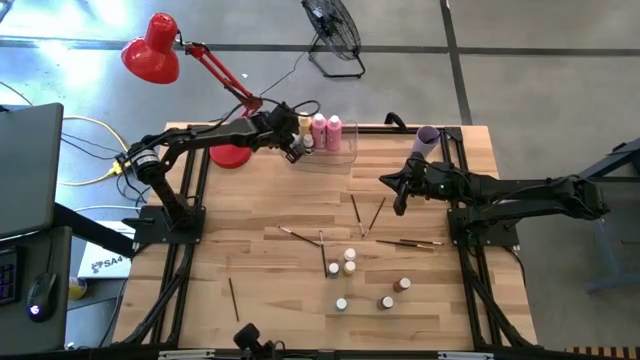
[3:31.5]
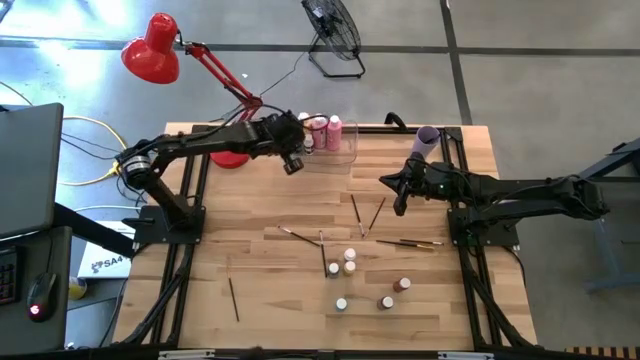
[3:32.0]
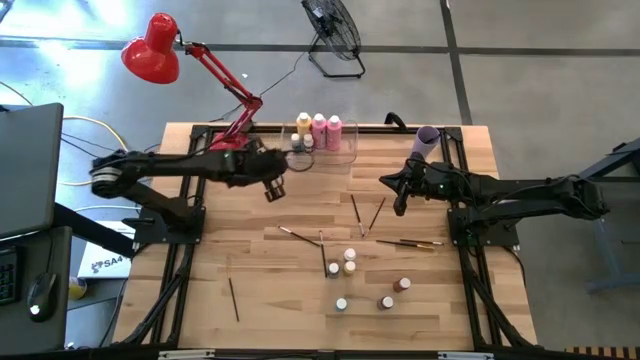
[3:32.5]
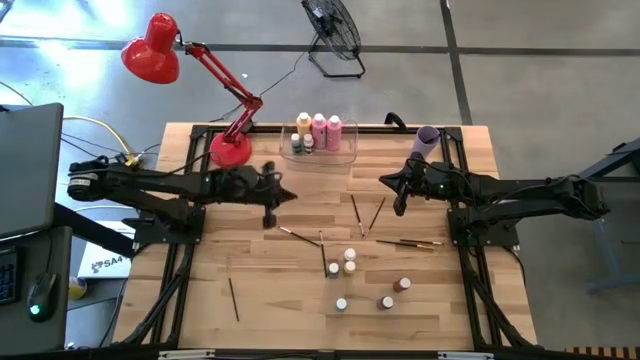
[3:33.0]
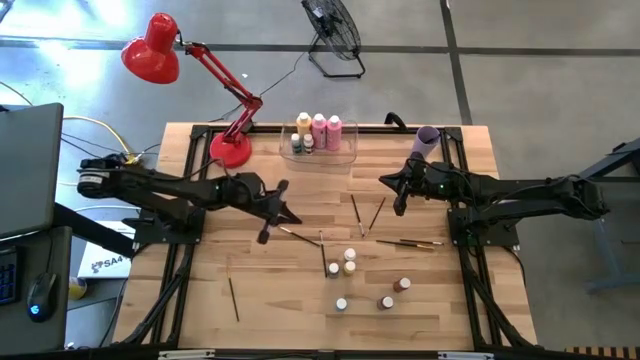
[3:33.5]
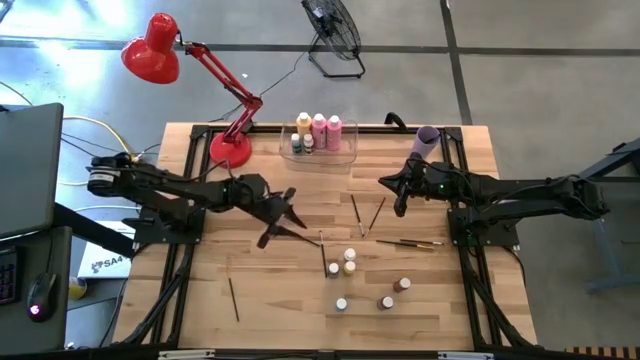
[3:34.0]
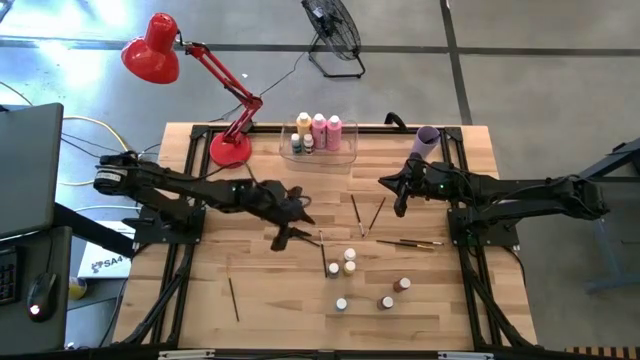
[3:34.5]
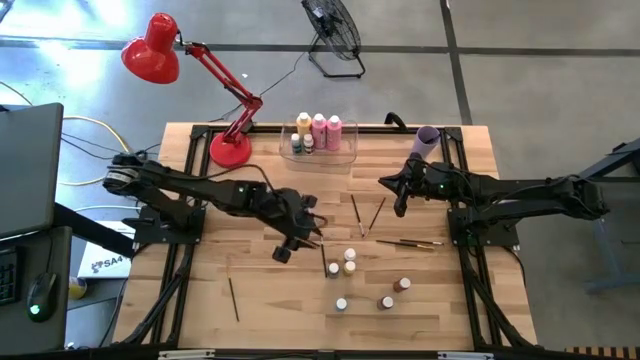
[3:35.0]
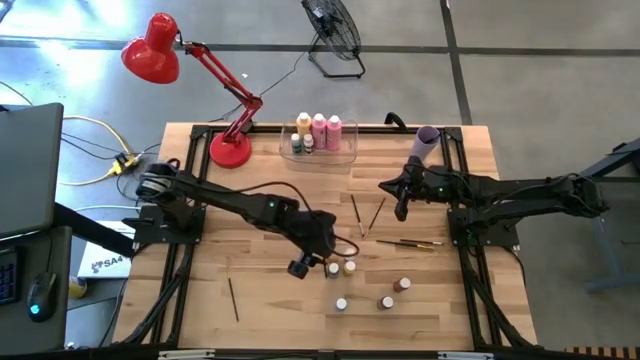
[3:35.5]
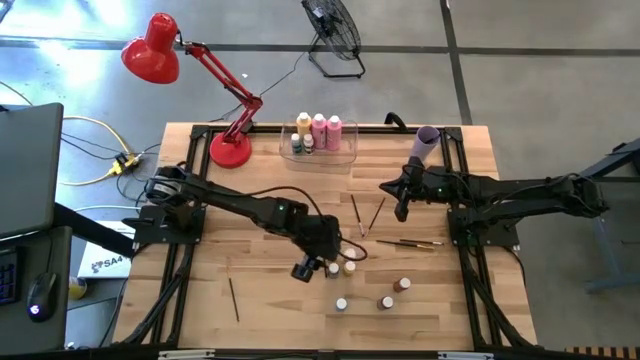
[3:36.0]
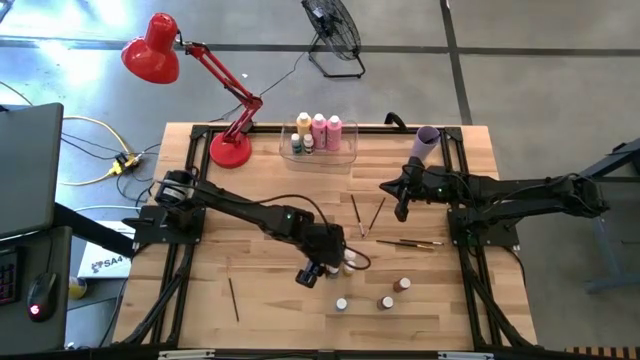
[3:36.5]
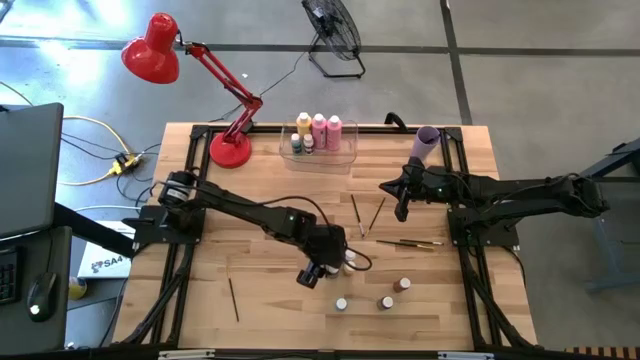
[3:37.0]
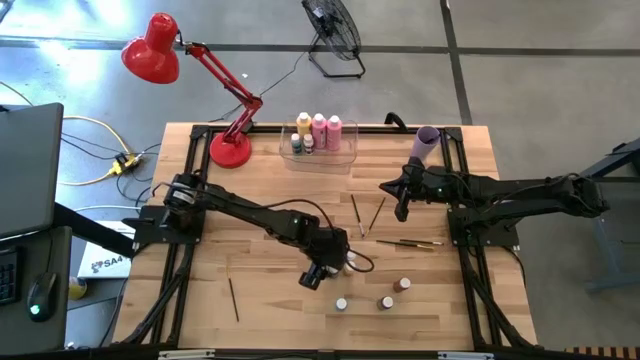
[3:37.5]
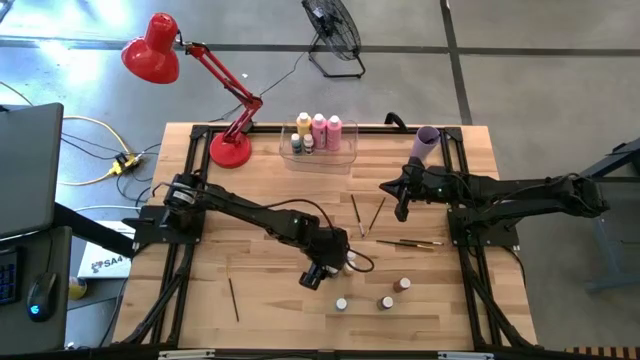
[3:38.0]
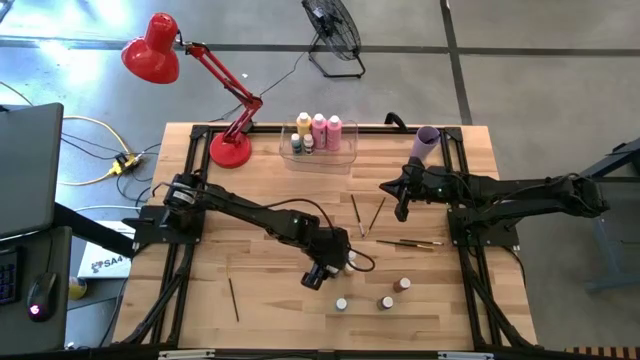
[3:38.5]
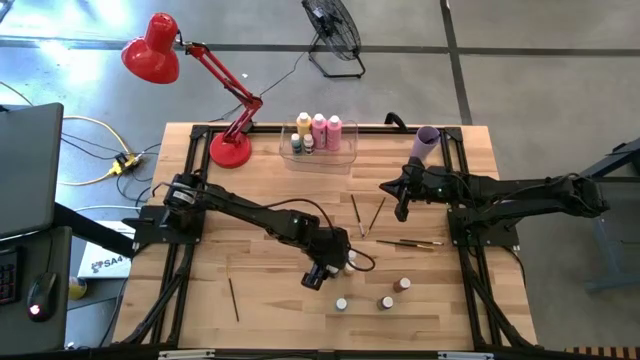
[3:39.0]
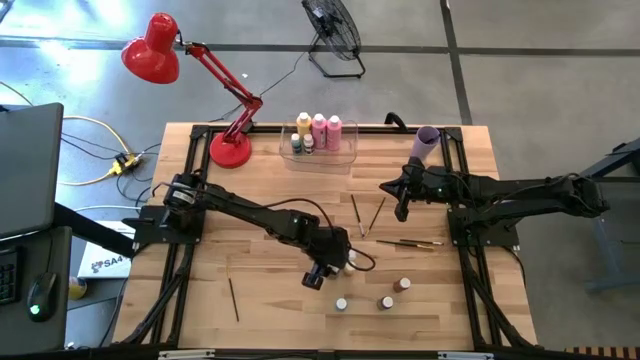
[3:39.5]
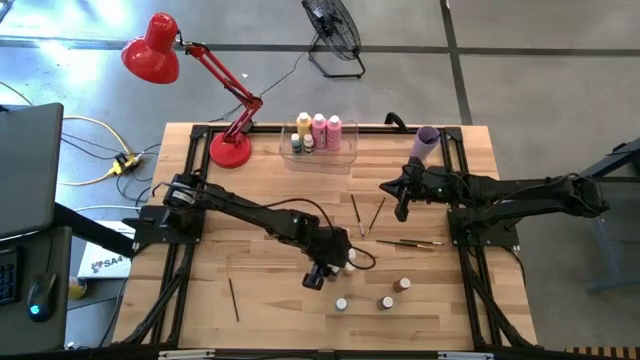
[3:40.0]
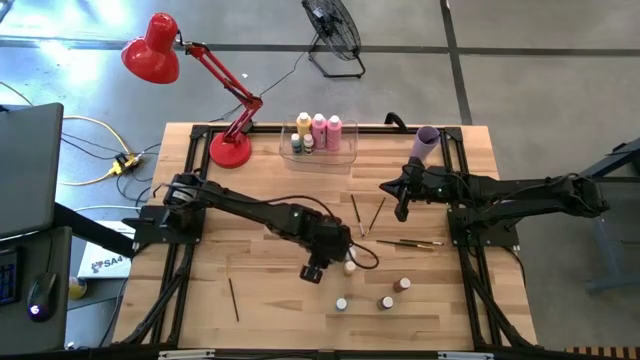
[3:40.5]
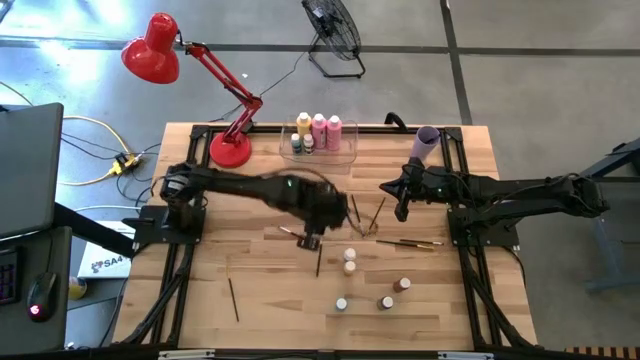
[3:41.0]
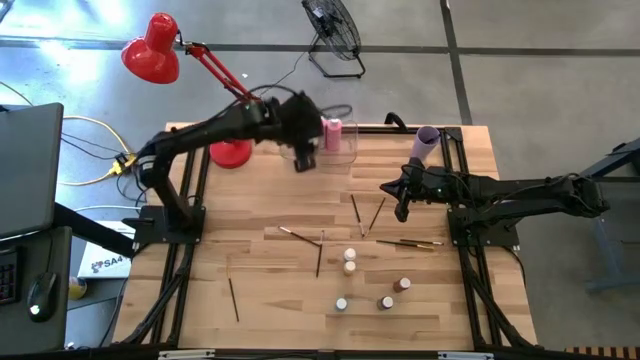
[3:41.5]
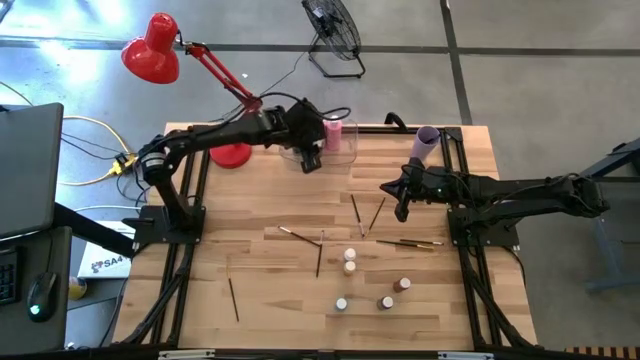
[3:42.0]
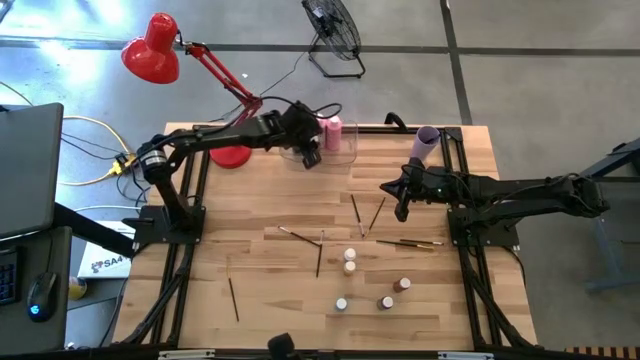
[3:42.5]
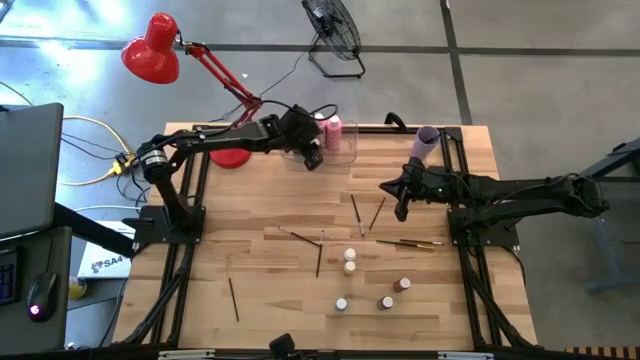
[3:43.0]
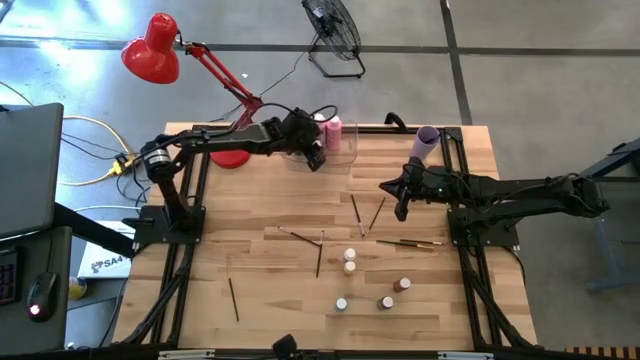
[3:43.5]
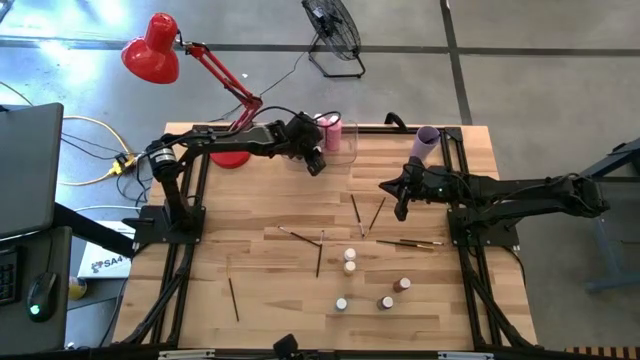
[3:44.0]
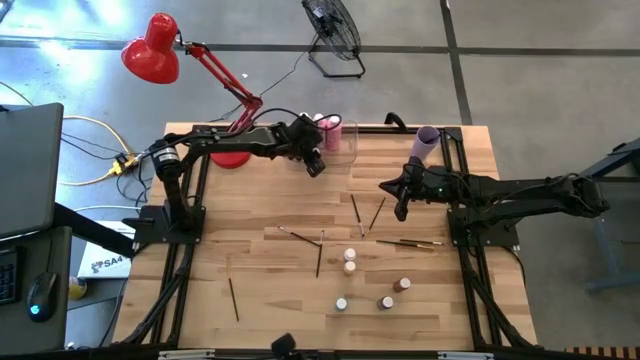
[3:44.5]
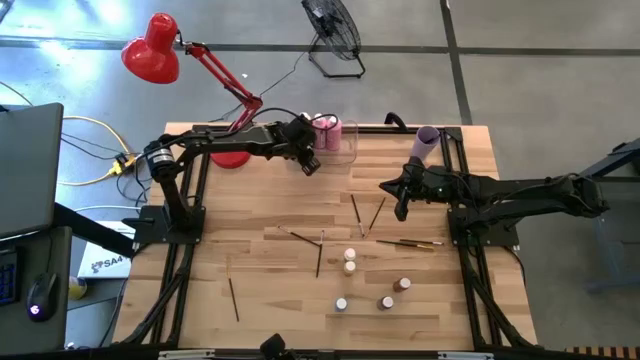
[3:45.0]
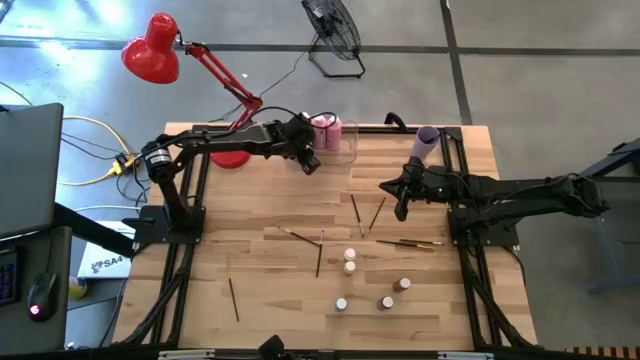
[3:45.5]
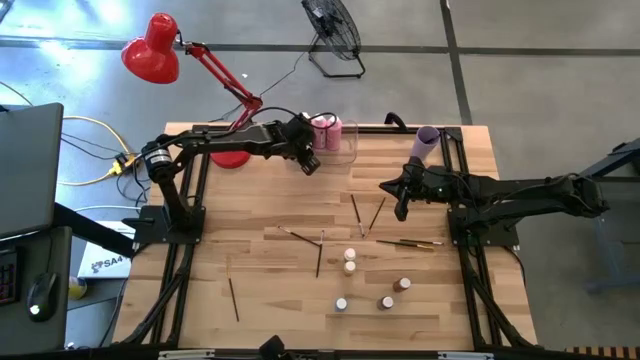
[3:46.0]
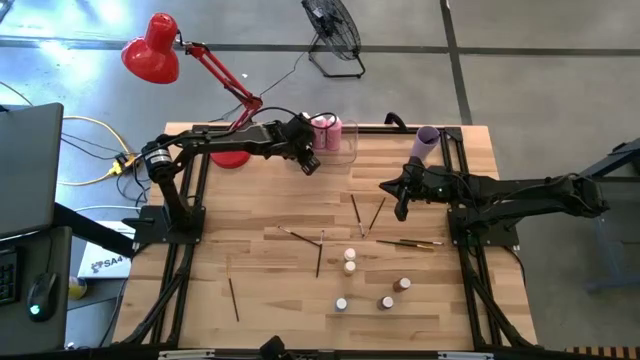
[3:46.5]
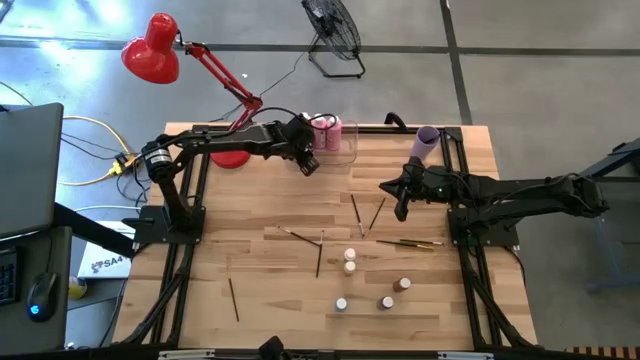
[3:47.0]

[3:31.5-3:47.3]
Task: Pick & Place Paint Supplies
Put the small green paint bottle into the transparent bin

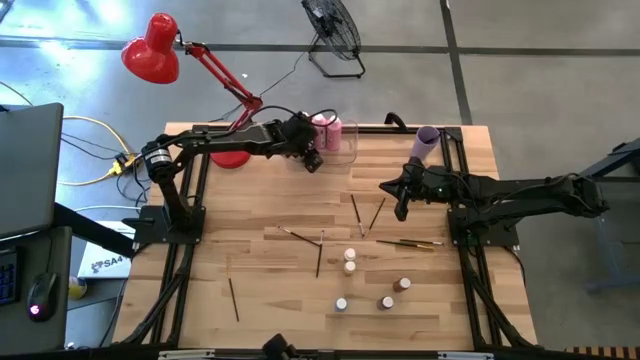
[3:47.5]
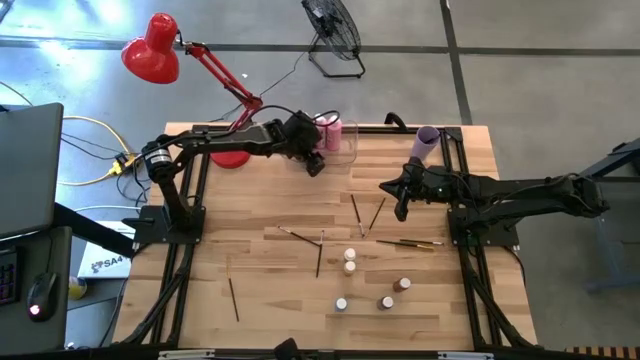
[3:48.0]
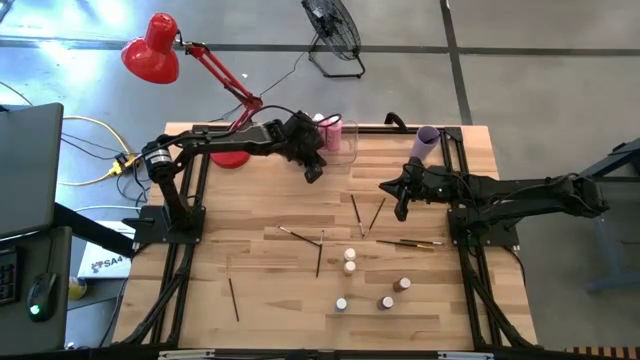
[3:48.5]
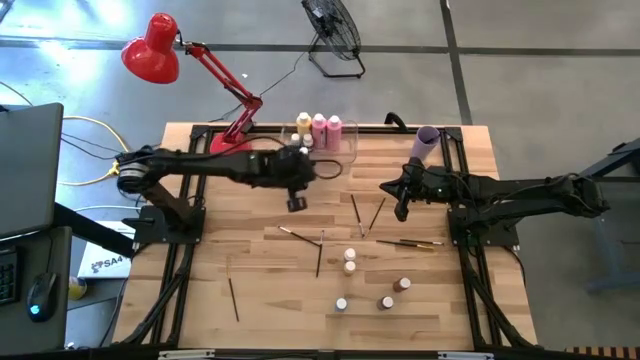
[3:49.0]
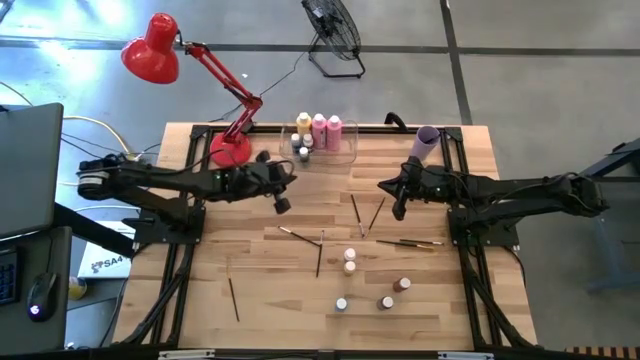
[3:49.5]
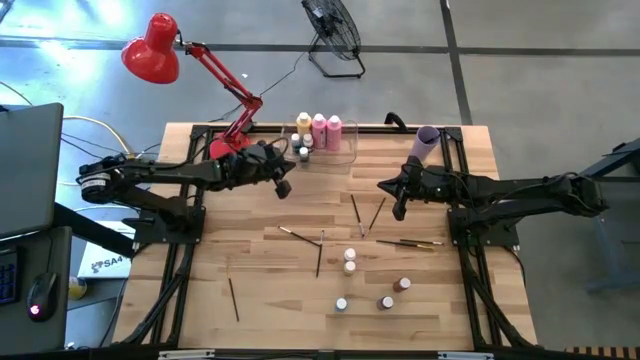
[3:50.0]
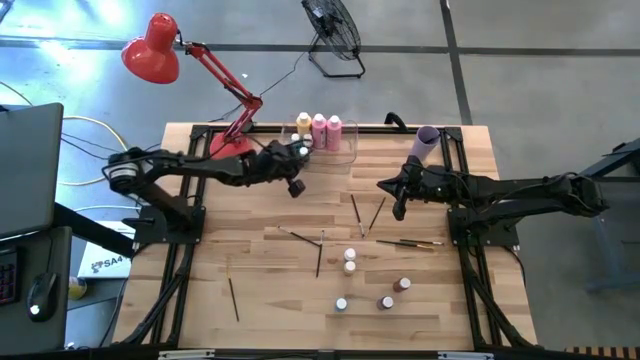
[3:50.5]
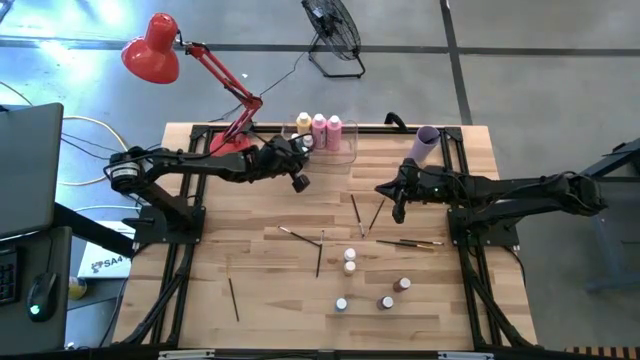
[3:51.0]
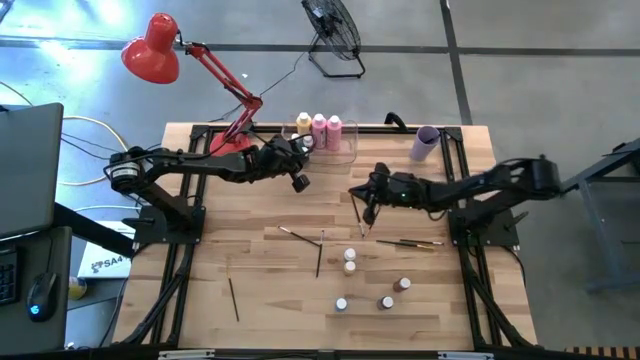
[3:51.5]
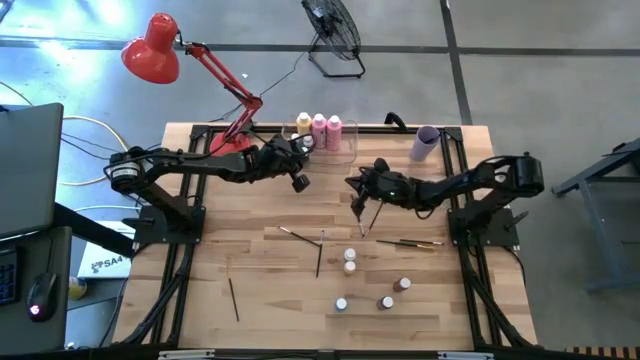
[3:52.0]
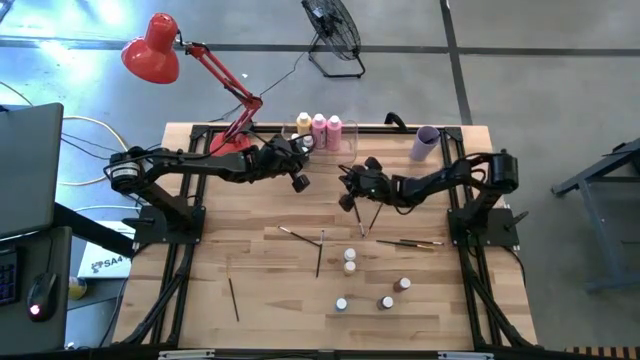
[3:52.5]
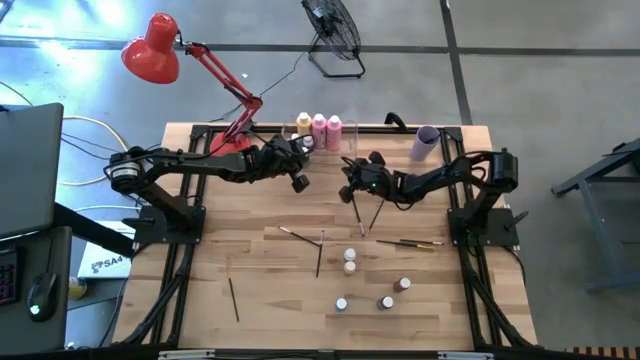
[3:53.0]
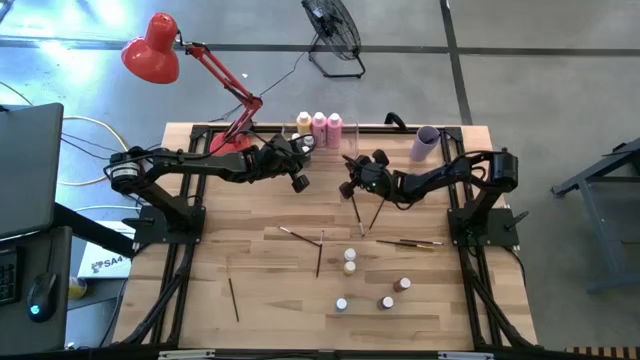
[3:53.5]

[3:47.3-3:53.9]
Adjust the transparent bin
